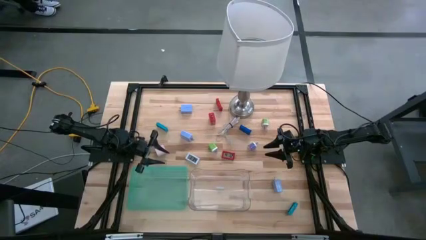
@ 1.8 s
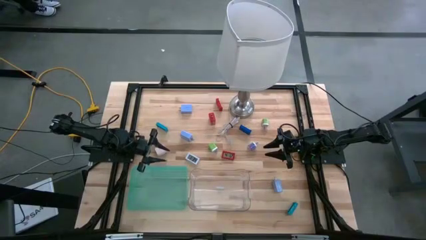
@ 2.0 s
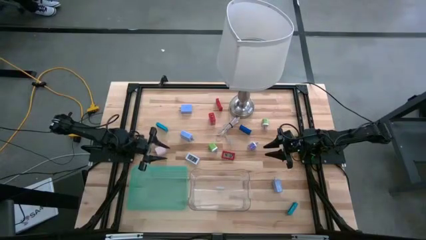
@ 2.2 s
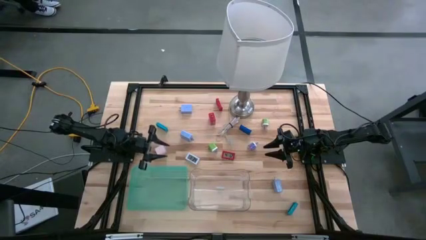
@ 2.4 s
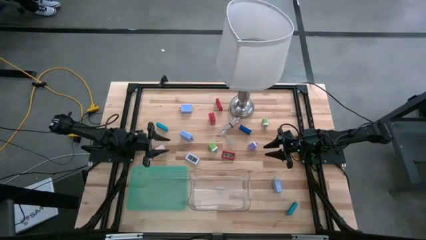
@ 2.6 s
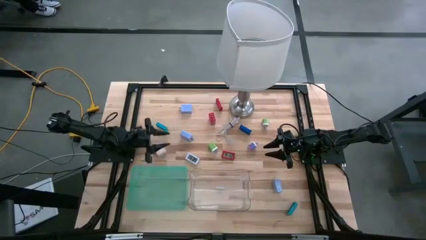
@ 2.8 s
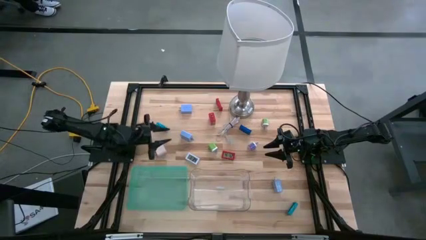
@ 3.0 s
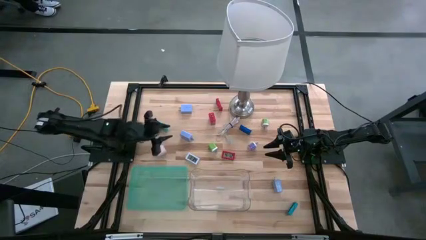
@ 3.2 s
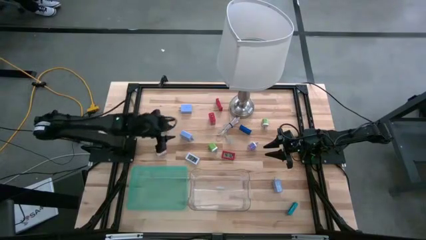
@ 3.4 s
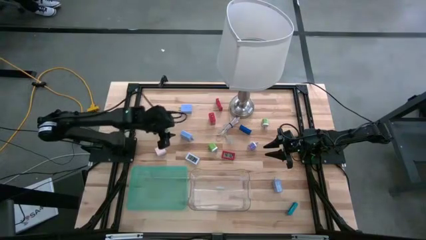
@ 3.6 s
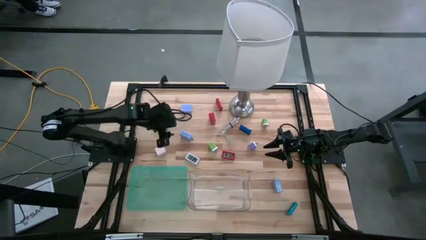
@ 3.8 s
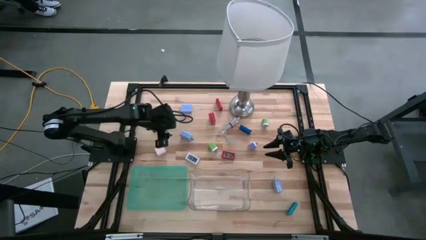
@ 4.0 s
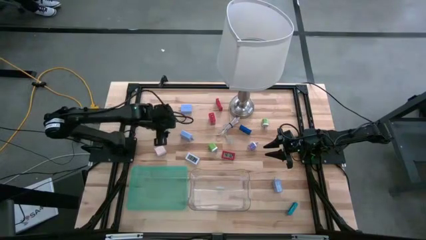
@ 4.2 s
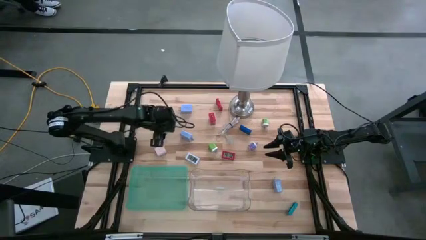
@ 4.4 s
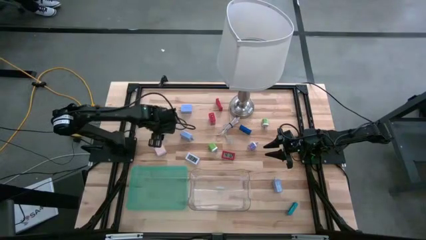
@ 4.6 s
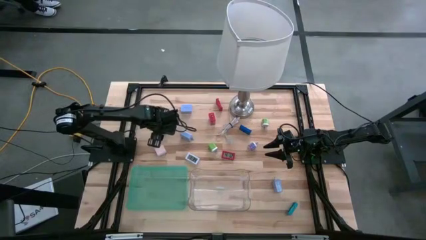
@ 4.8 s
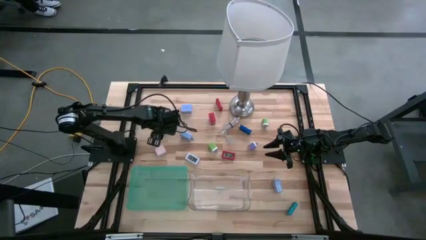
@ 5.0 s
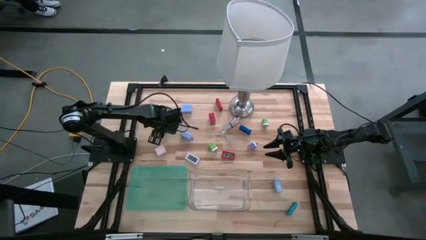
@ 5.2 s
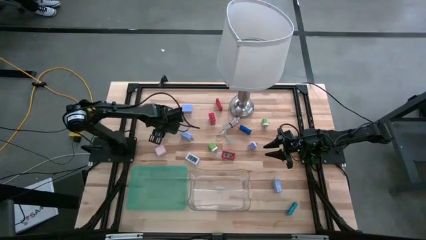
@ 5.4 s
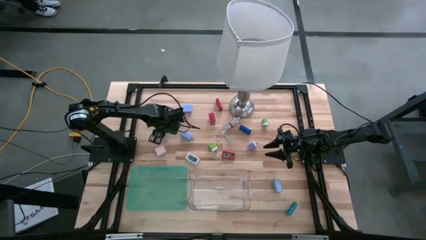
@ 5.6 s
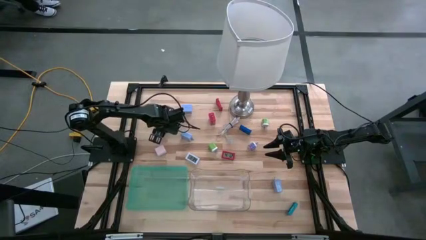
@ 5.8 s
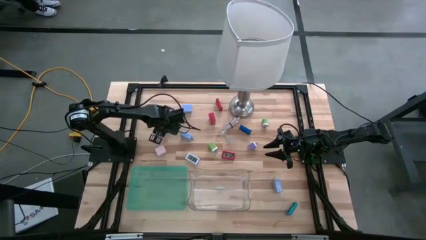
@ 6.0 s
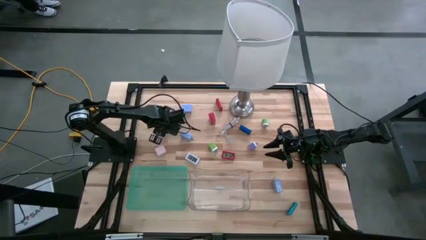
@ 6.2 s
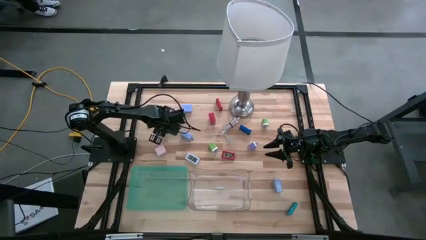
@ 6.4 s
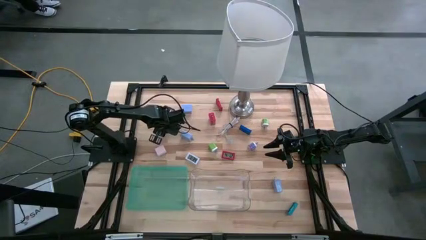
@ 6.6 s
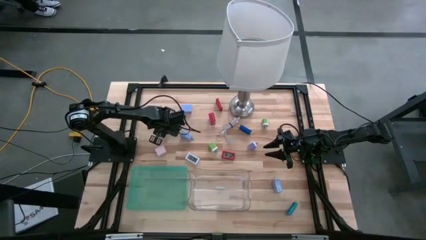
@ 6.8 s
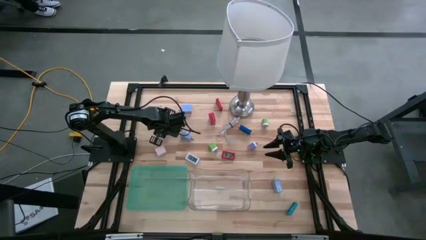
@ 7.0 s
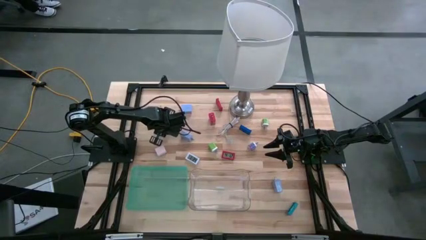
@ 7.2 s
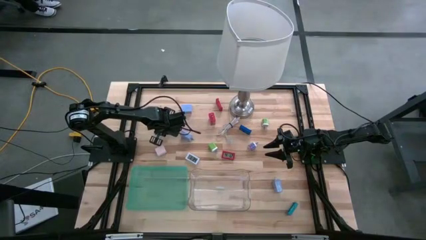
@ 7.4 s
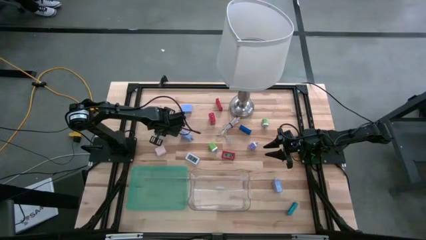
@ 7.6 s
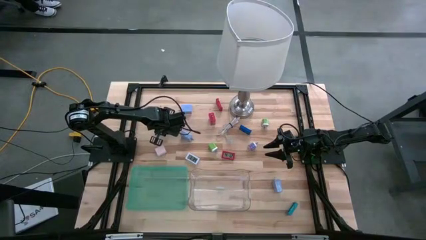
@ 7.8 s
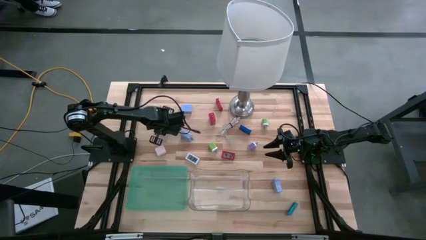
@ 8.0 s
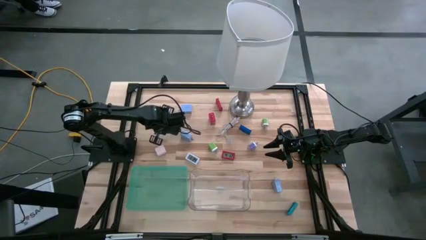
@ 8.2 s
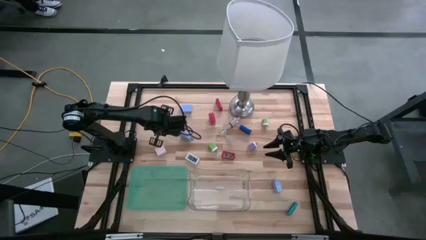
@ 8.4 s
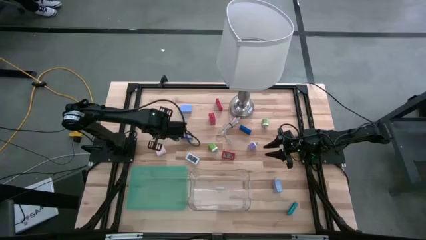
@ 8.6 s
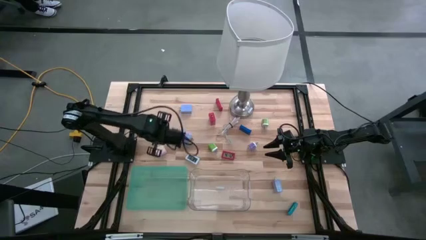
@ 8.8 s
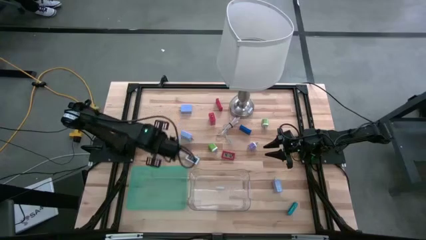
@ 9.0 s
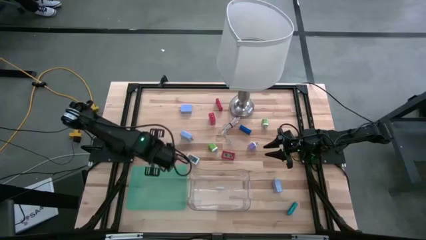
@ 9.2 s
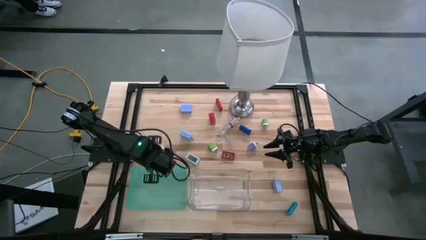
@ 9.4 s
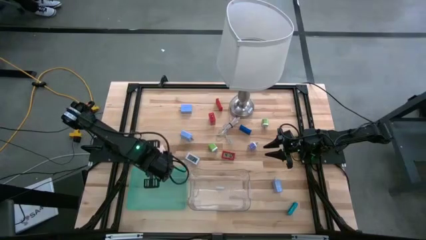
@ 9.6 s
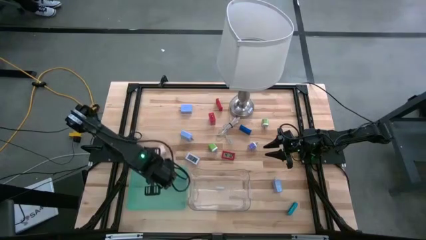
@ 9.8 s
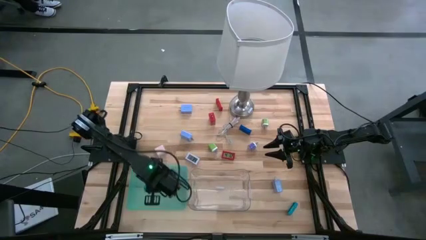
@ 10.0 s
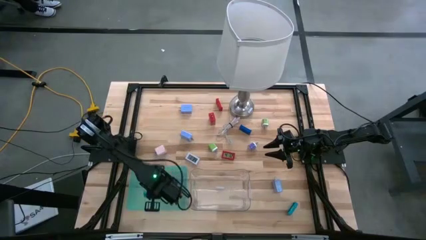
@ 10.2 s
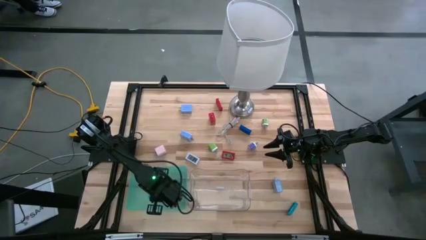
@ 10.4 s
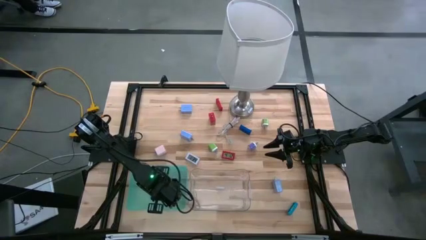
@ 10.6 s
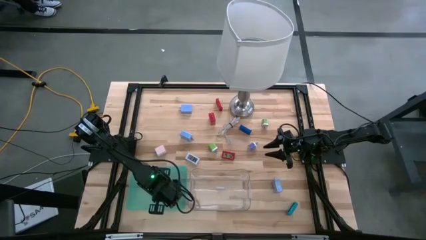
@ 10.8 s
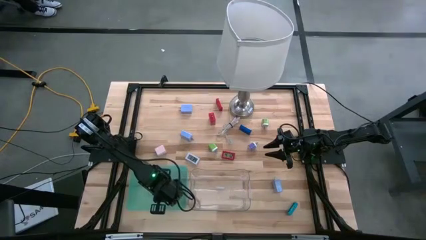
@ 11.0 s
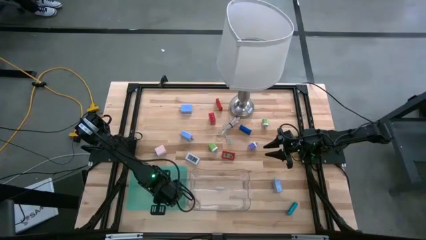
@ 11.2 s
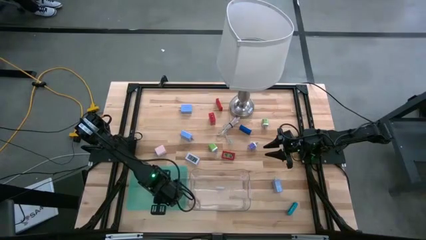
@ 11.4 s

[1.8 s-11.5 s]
Task: Pick & Place Office items
Put the top light blue timer into the green bin
